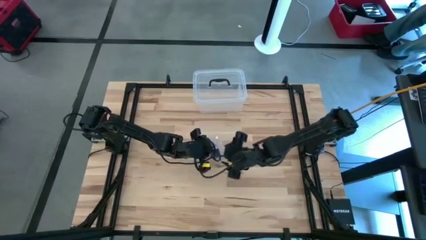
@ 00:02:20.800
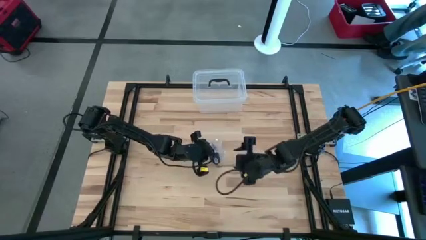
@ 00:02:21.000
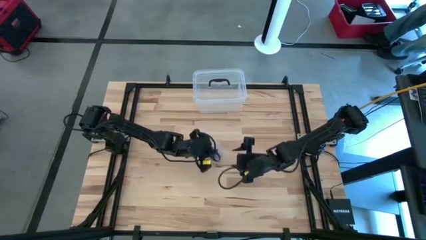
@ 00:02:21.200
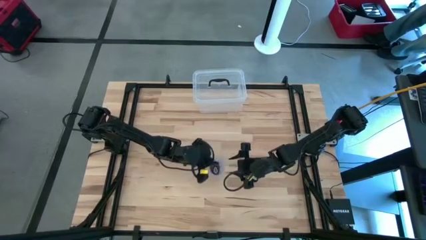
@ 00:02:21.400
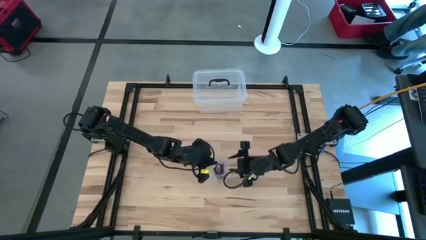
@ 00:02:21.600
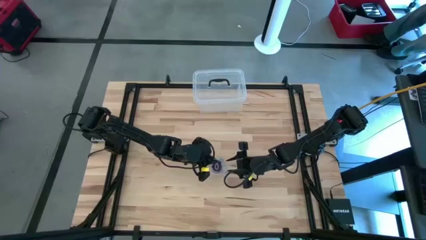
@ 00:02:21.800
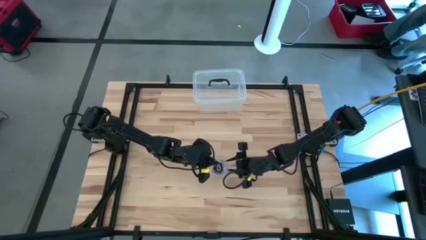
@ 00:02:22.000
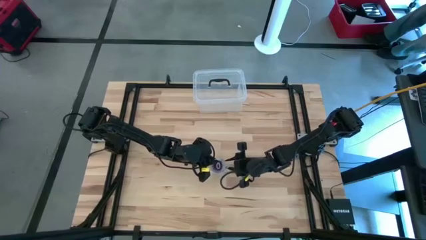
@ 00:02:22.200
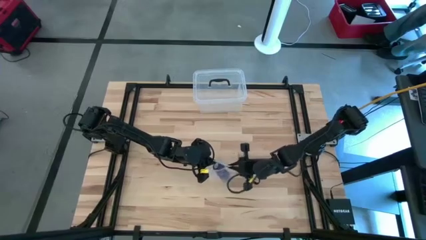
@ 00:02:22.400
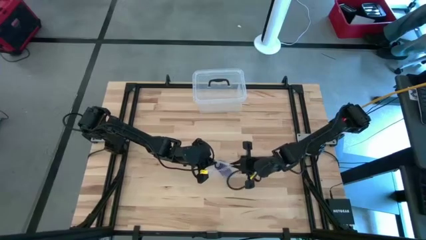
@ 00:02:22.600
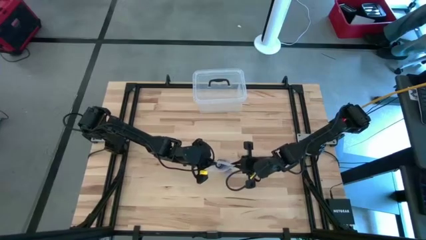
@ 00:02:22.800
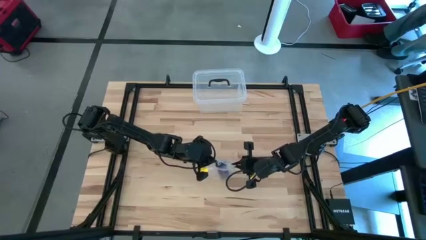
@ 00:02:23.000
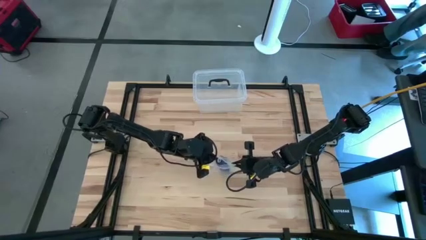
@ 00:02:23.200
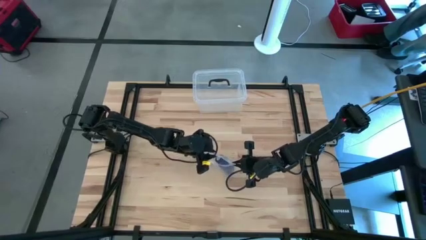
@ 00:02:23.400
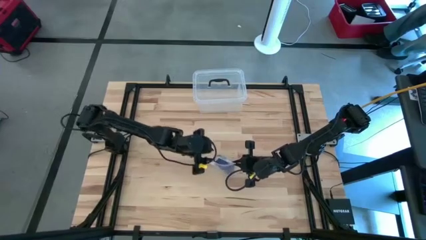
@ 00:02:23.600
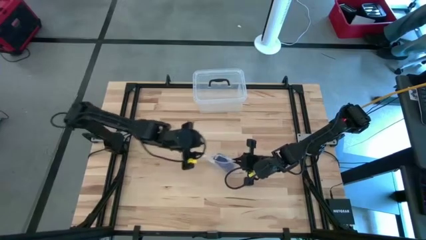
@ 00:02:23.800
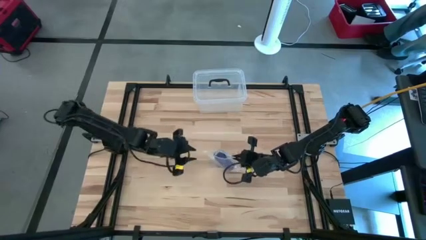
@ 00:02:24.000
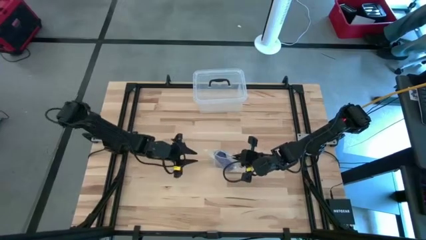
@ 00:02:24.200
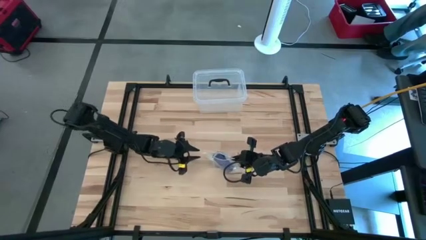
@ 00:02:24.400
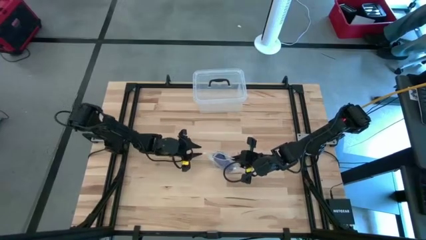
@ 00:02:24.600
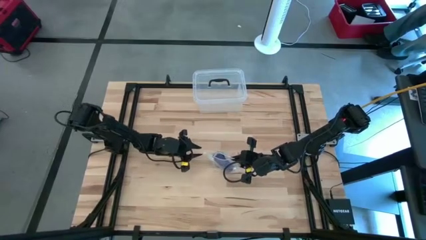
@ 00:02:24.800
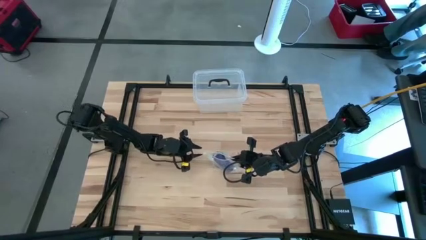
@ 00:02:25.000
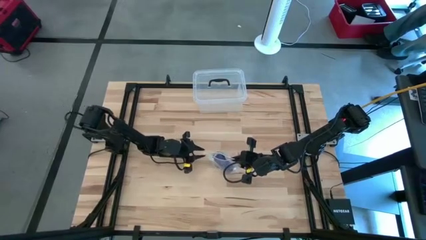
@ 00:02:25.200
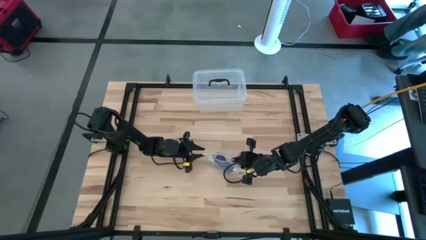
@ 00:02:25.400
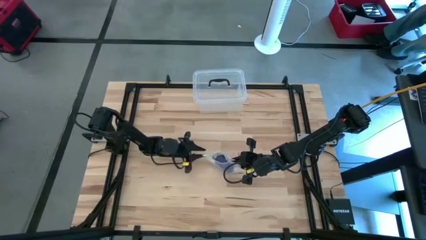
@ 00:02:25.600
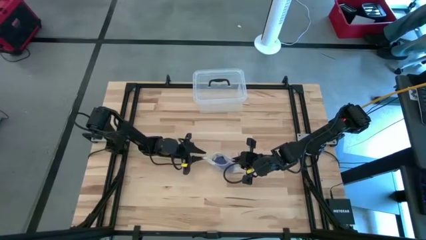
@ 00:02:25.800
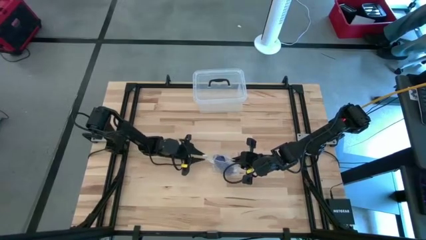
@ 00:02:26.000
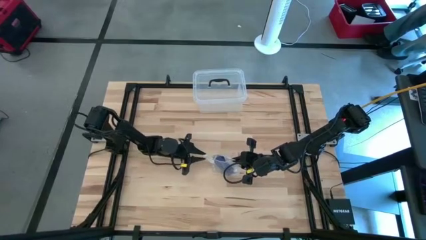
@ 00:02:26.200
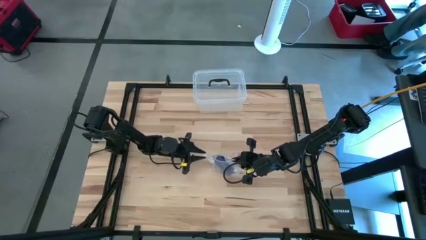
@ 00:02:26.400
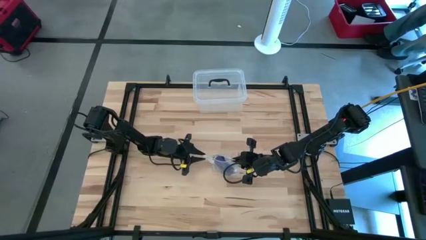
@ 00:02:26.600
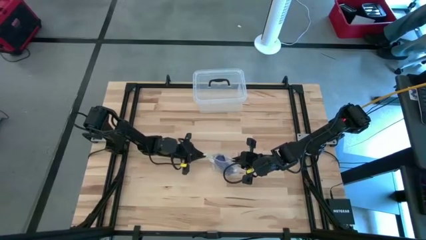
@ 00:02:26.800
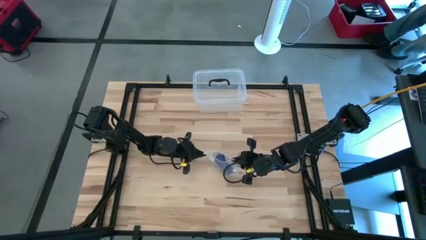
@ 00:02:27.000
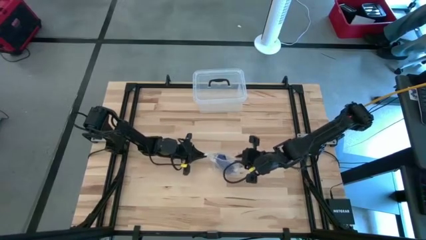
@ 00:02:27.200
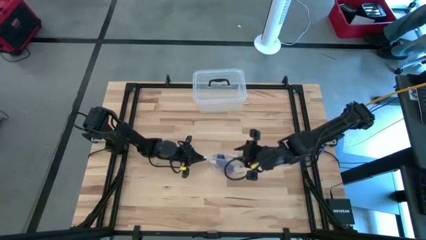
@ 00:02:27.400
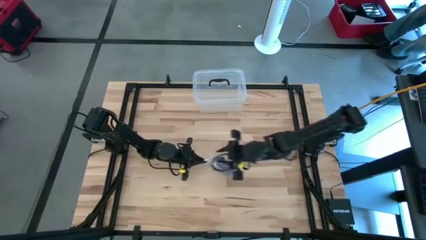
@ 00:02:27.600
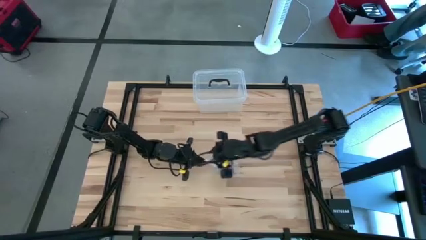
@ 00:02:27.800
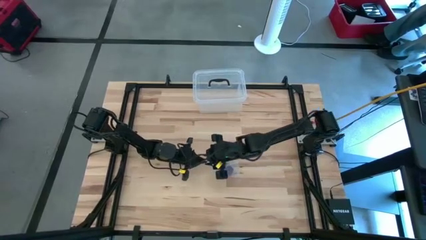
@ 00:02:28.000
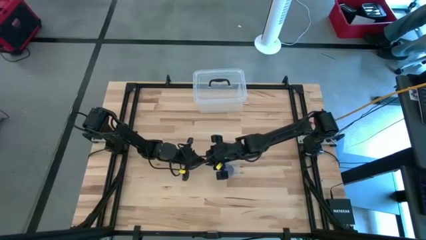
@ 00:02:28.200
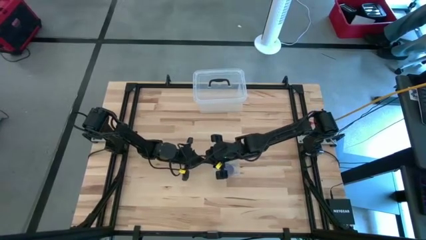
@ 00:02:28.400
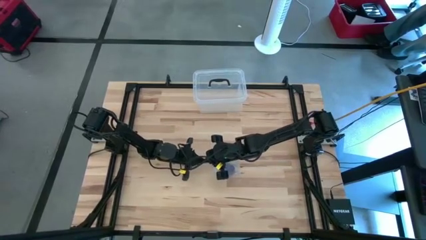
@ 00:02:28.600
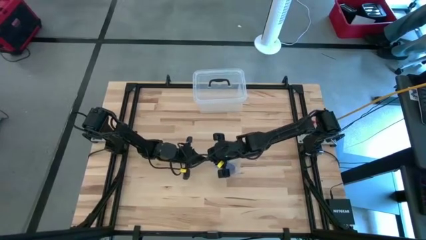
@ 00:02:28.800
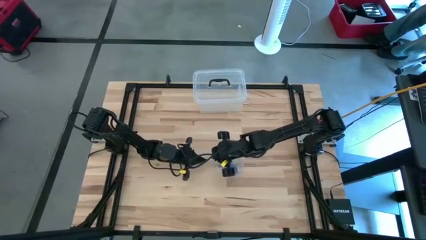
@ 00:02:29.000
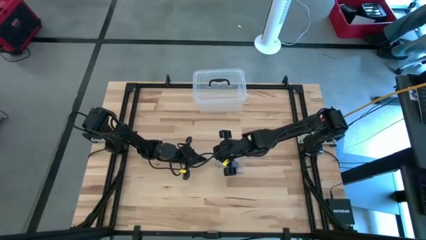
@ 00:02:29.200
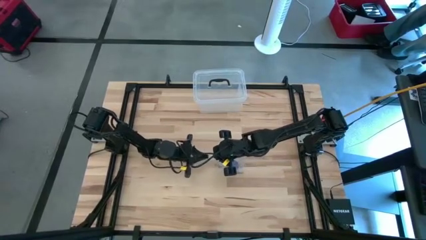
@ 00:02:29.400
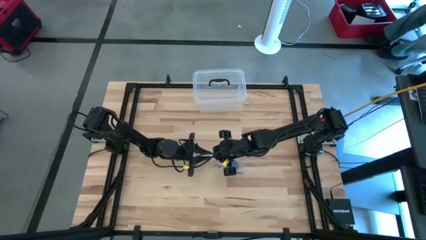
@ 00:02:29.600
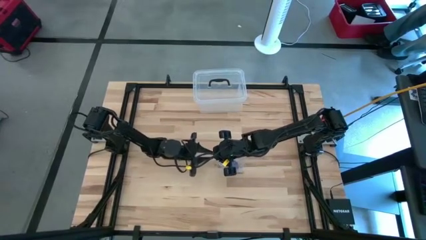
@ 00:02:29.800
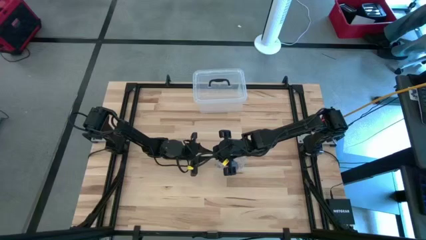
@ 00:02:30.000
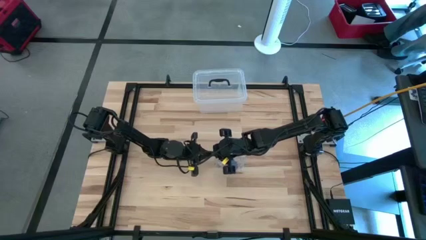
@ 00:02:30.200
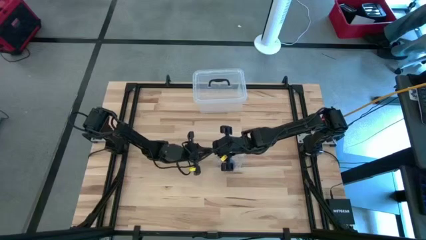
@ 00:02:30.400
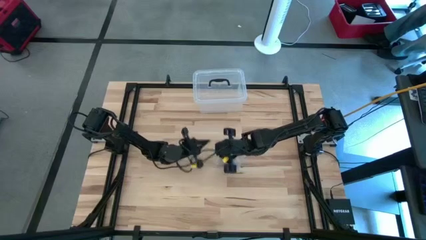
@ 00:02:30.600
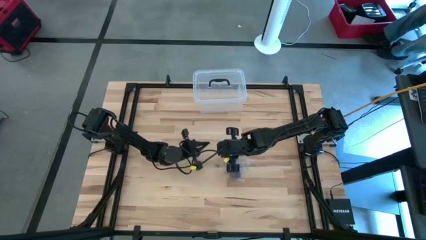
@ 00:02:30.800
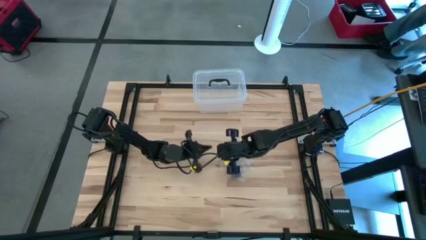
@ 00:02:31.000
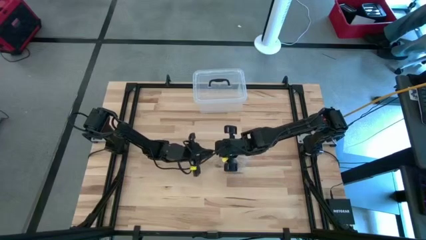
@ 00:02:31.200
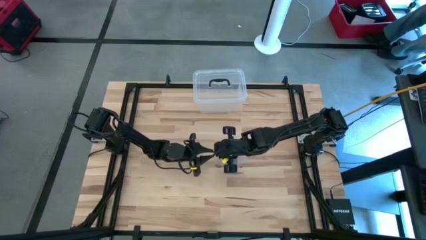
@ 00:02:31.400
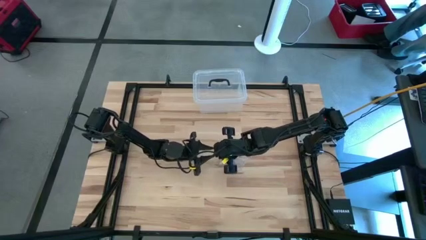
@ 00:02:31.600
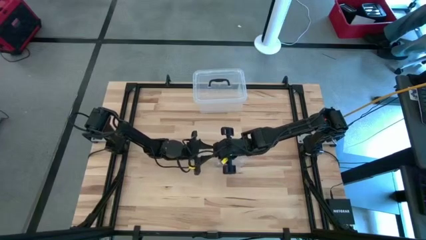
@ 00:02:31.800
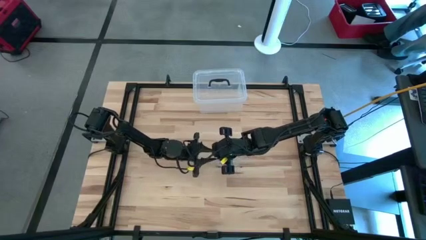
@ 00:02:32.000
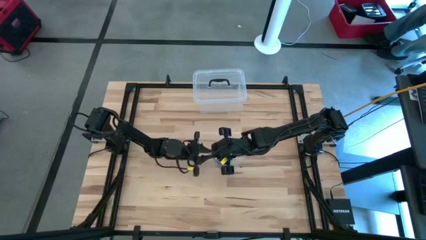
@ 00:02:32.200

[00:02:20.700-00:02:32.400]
Task: Roll bandage
Close the transparent zip bag

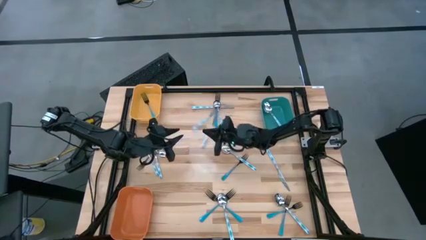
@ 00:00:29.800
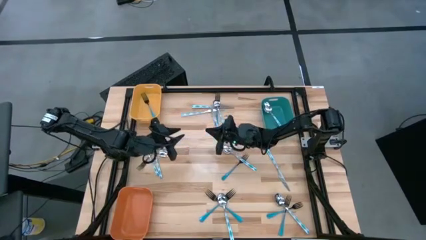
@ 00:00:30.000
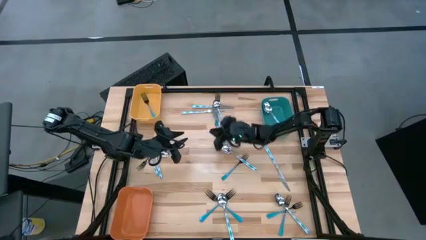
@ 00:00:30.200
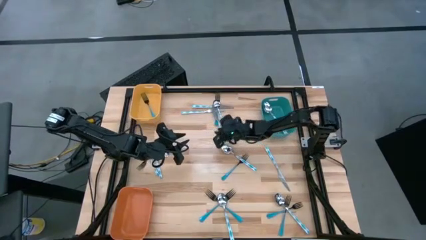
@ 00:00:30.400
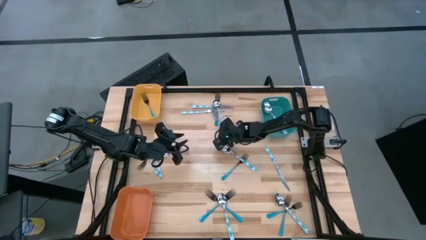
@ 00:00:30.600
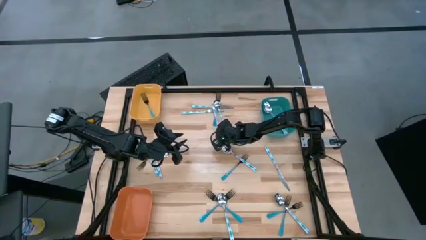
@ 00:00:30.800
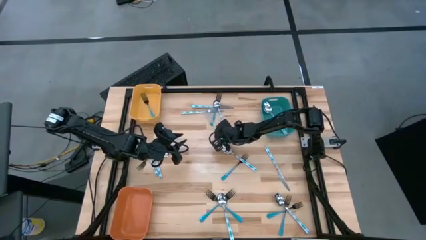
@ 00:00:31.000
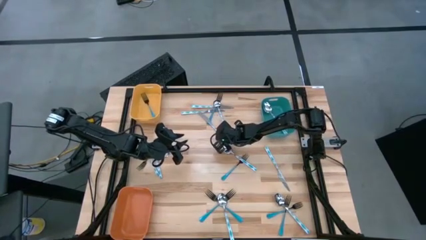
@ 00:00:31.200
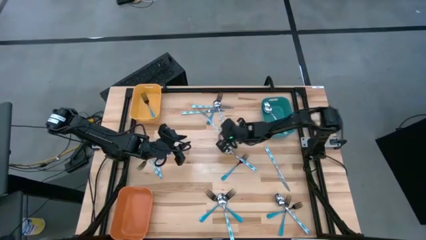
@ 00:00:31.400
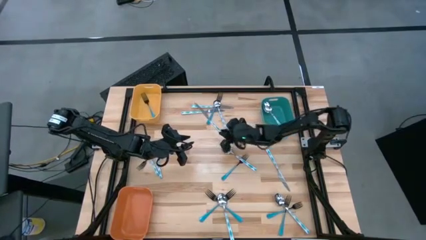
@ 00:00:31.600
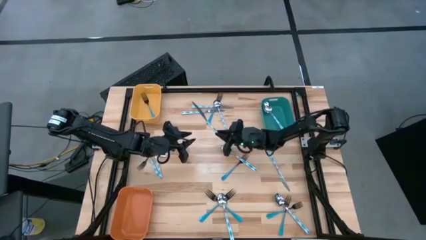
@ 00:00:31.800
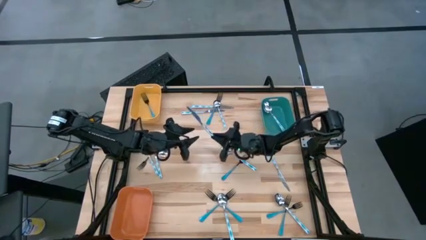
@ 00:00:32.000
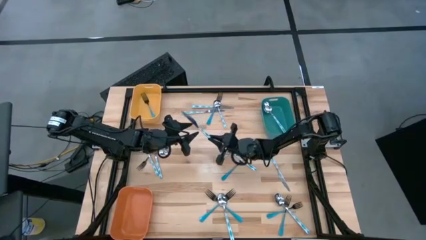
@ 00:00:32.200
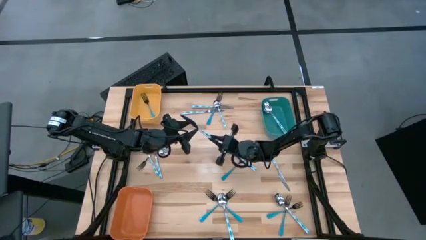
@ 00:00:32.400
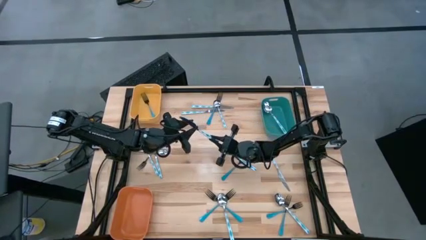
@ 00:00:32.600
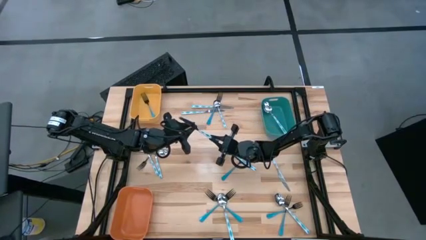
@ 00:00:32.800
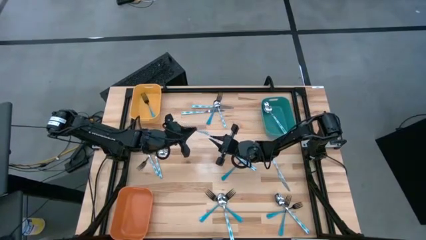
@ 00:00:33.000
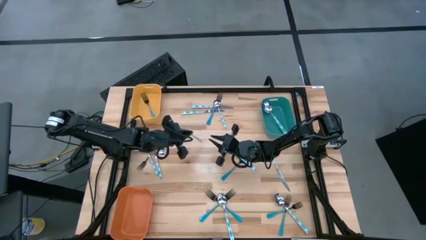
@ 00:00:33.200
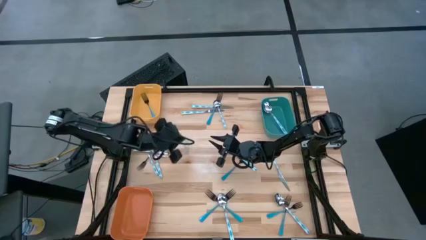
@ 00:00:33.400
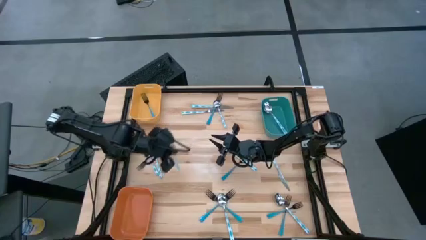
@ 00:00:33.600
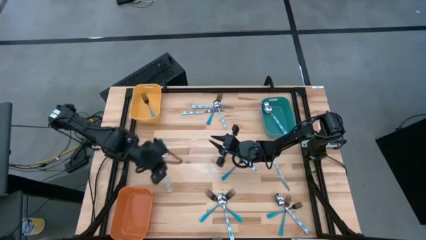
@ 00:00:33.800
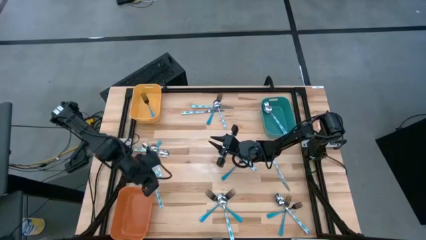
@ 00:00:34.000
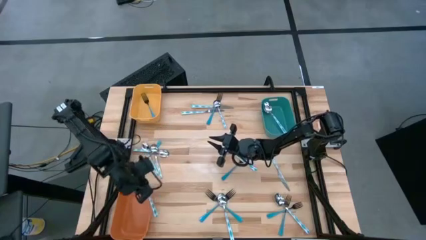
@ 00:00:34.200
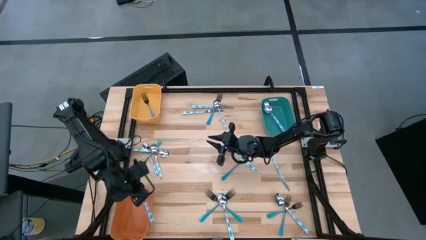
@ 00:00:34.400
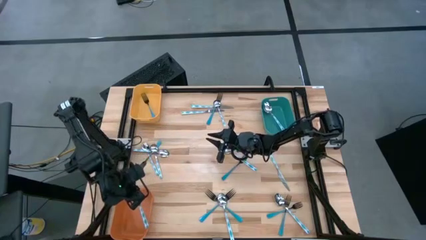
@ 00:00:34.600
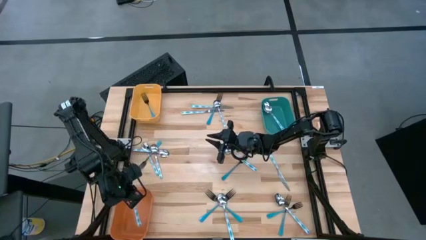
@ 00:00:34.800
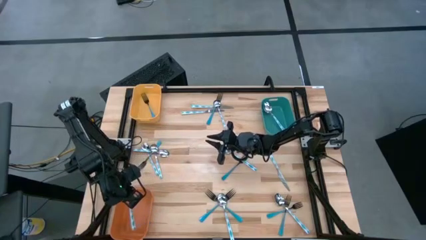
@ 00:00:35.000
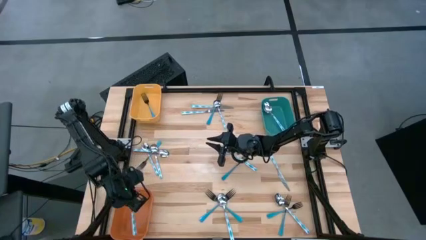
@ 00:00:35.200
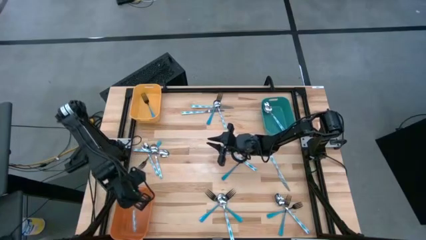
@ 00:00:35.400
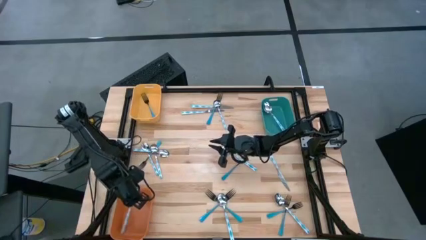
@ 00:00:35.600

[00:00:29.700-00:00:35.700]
Task: Sort silverware by color (type)
Put the white-blue table knife into the orange bin
